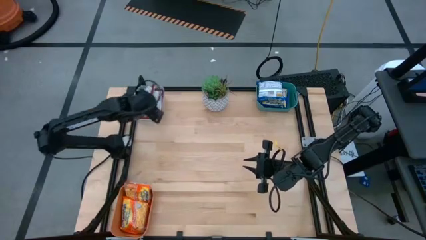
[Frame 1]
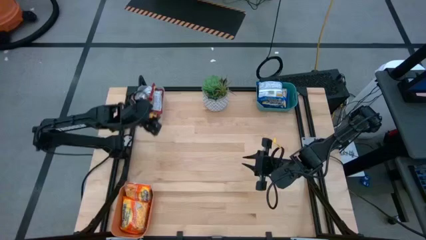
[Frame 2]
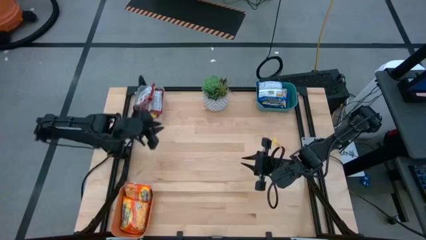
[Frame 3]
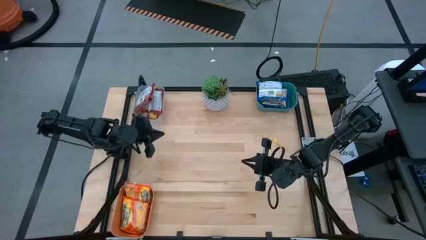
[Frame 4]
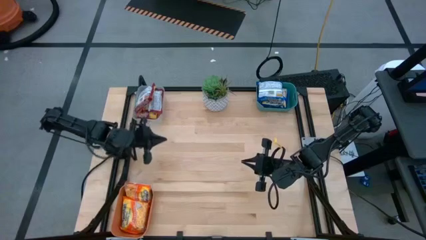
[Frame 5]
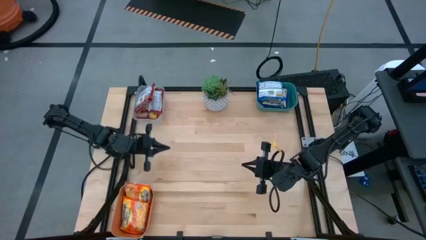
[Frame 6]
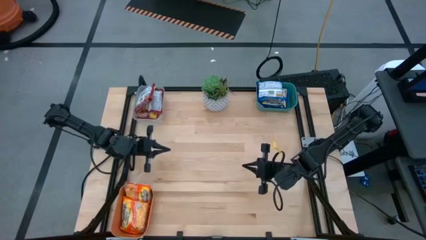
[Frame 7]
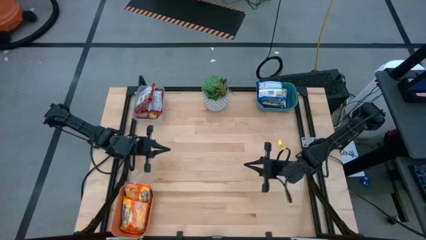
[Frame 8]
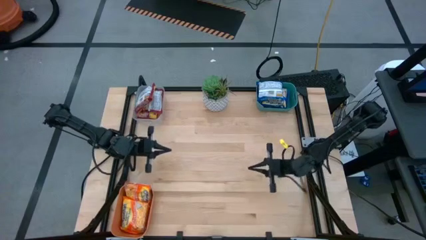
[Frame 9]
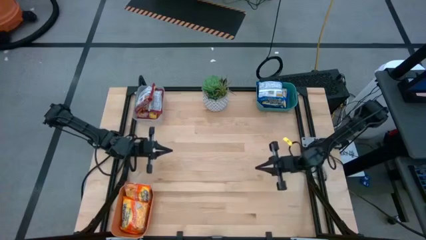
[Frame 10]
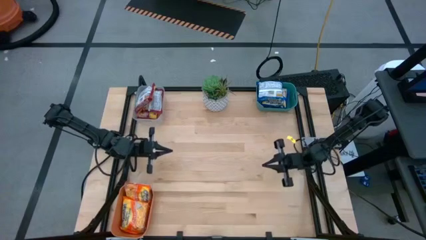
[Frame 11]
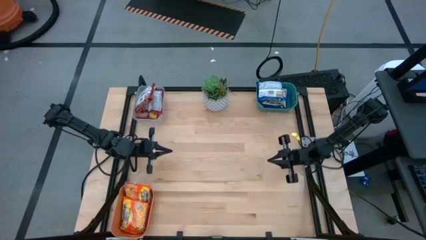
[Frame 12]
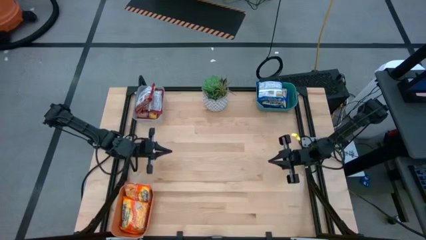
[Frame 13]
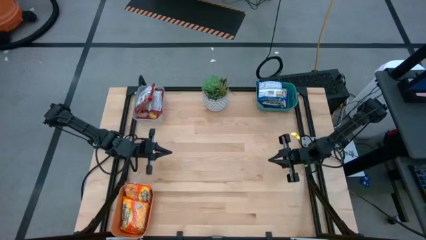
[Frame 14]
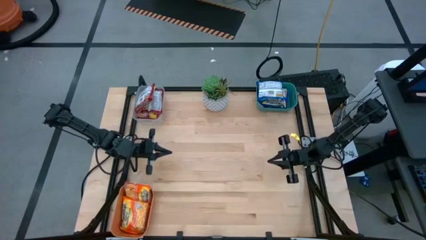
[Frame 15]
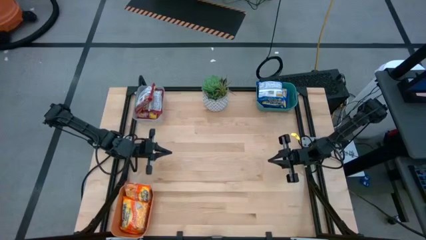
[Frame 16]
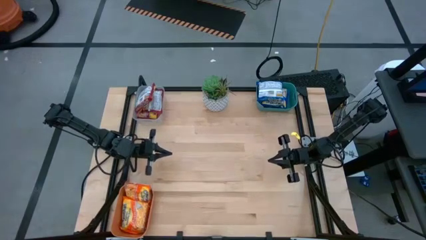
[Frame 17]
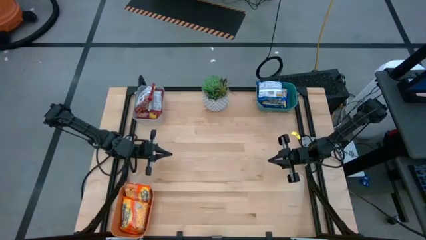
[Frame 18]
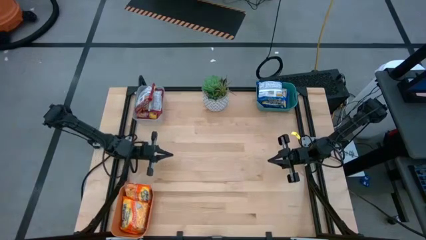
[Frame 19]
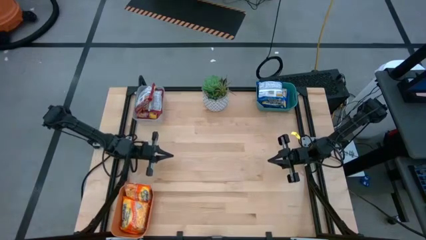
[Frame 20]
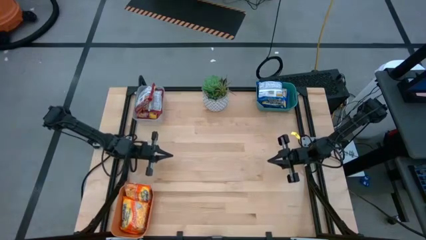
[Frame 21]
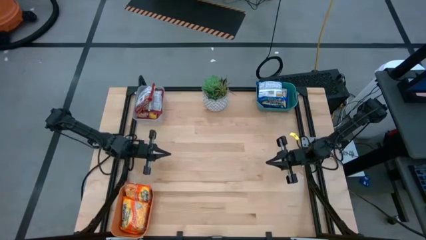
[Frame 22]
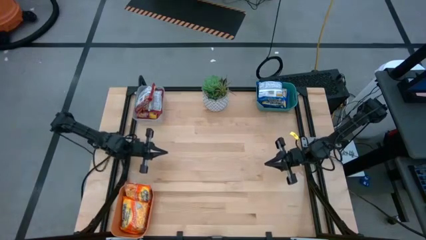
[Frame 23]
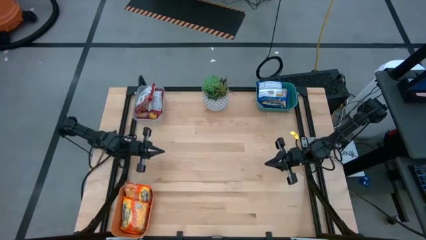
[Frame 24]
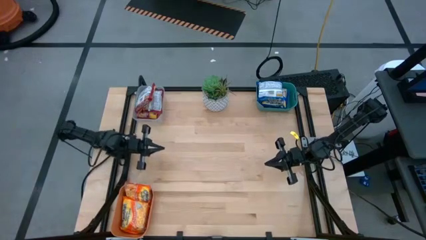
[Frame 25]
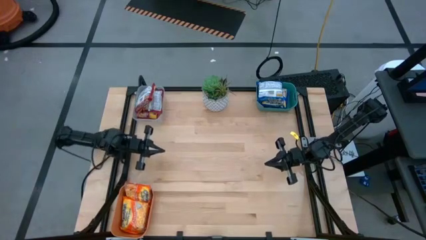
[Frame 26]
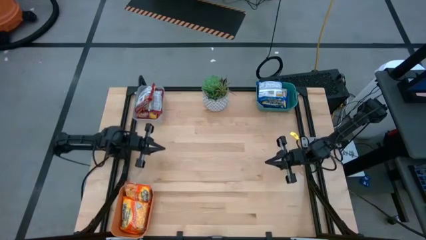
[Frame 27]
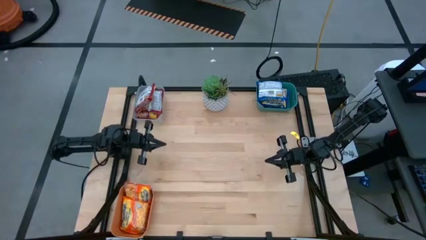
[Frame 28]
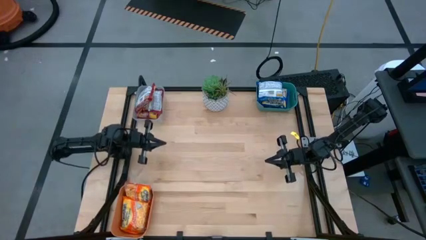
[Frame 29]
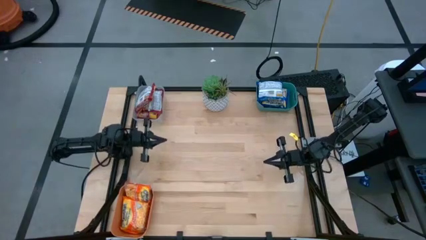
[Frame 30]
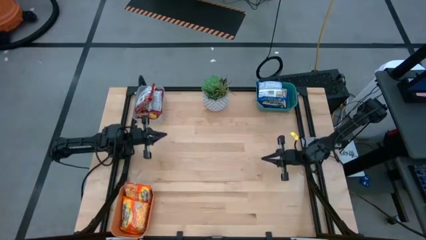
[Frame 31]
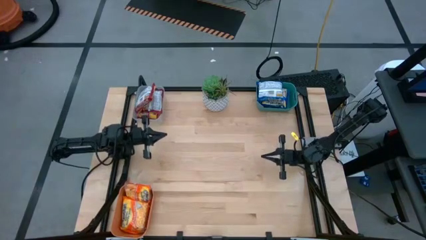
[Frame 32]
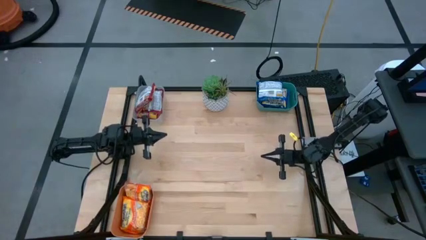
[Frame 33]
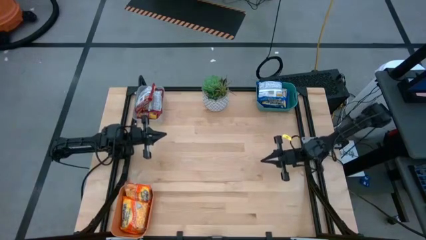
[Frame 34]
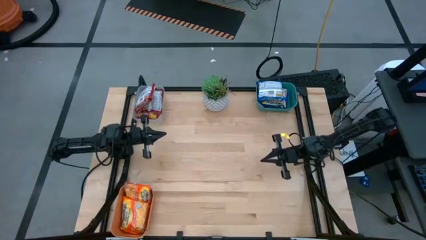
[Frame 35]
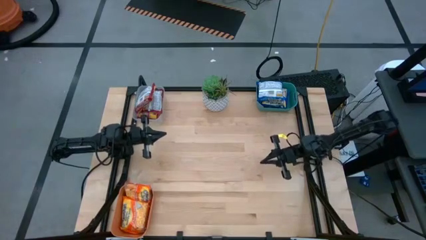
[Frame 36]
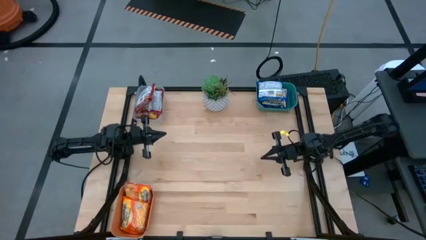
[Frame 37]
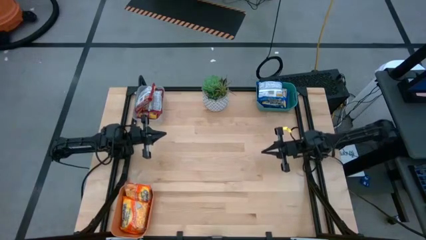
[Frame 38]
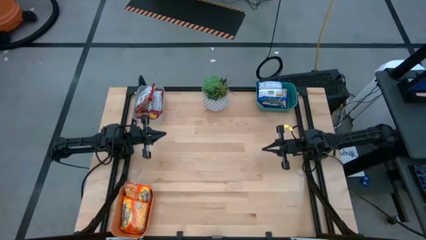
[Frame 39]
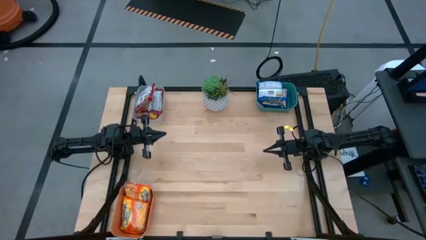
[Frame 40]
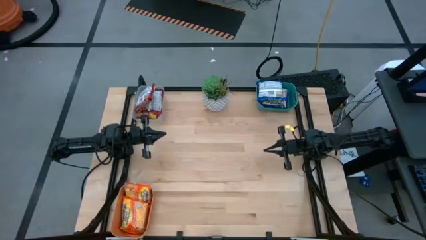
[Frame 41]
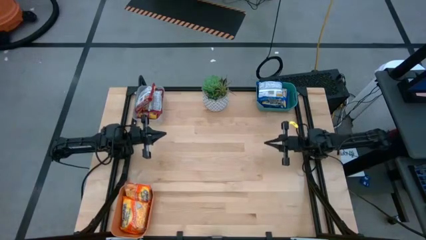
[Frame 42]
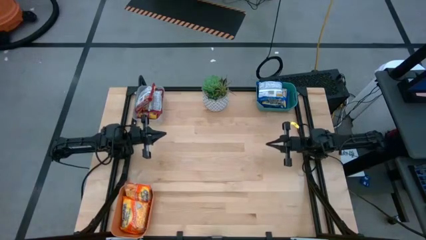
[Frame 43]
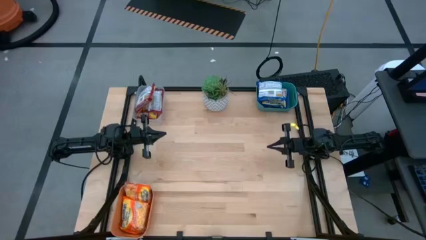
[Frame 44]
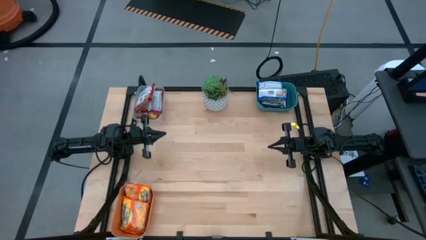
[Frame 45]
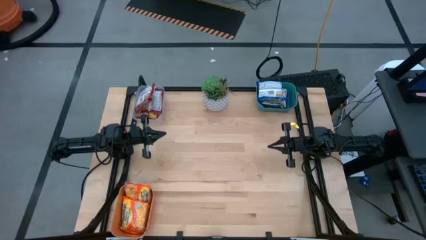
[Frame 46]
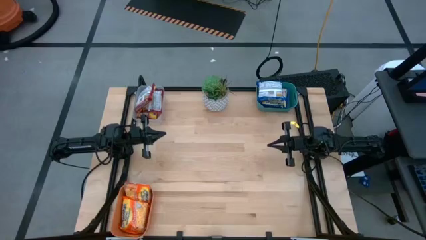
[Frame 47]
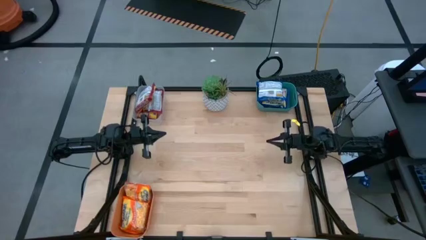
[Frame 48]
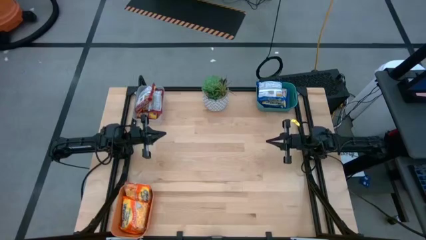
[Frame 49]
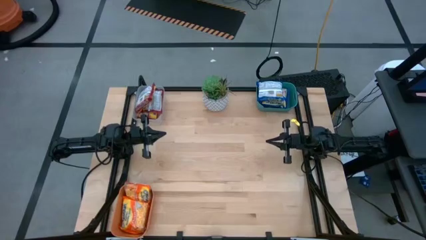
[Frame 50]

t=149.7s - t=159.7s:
Task: Sort Maruchan noodles
Return to Home Position

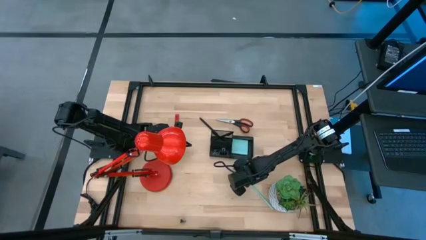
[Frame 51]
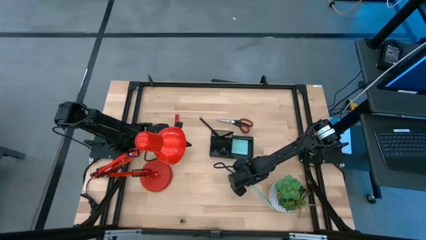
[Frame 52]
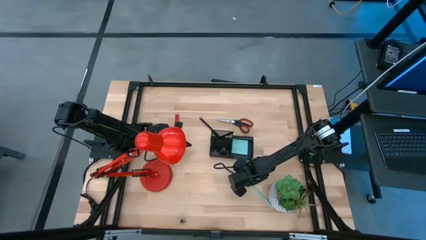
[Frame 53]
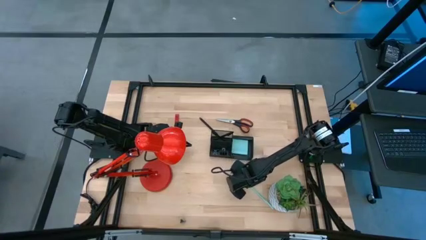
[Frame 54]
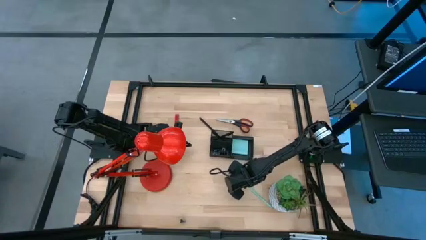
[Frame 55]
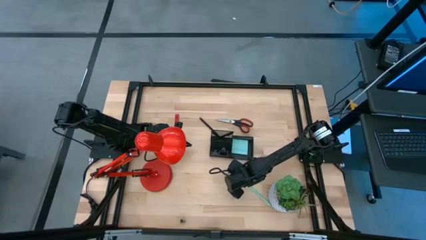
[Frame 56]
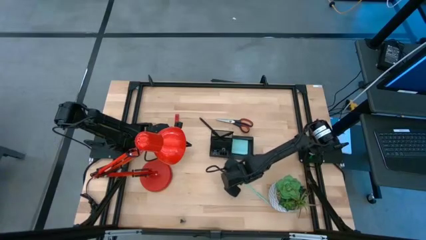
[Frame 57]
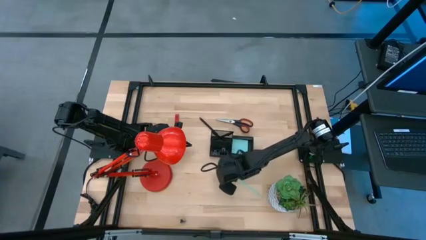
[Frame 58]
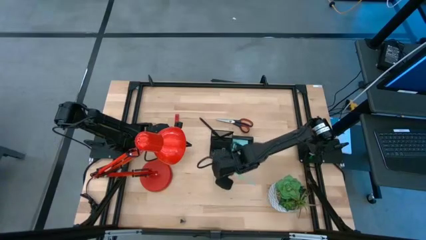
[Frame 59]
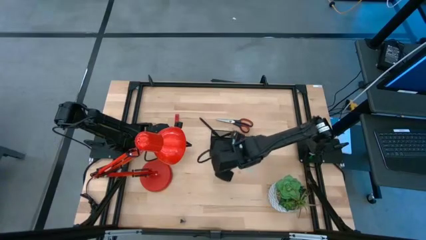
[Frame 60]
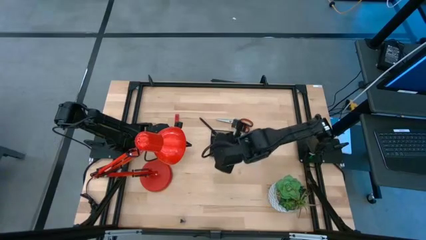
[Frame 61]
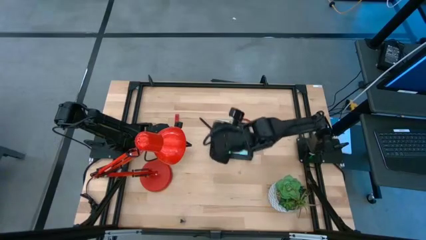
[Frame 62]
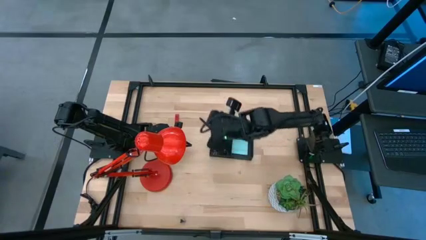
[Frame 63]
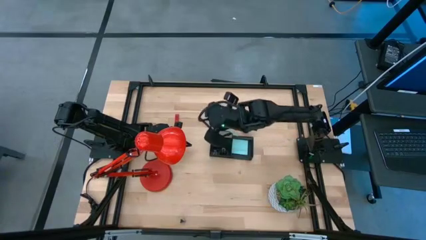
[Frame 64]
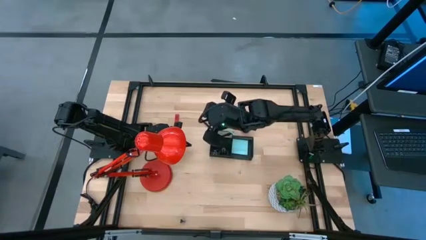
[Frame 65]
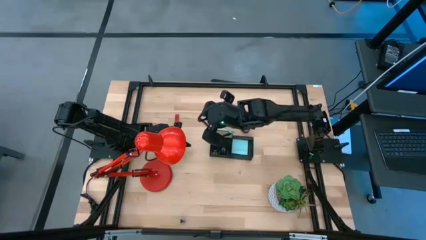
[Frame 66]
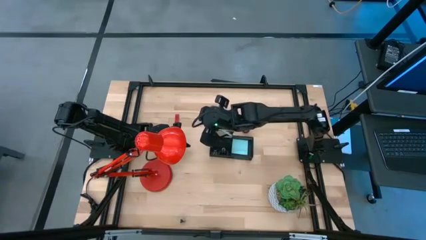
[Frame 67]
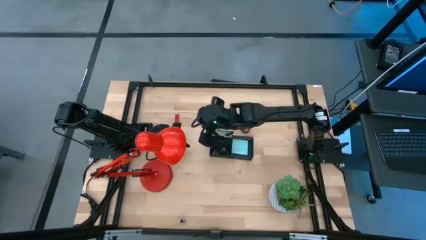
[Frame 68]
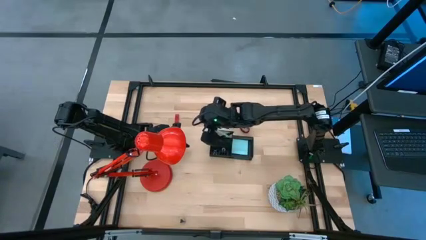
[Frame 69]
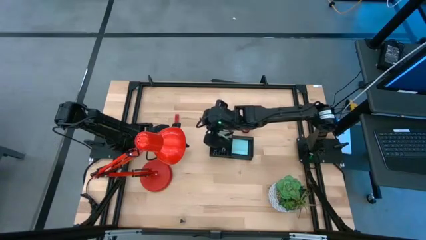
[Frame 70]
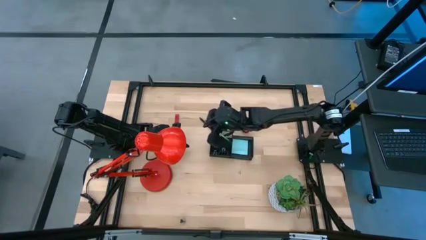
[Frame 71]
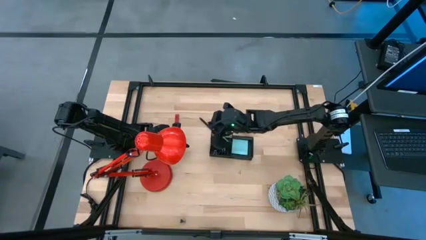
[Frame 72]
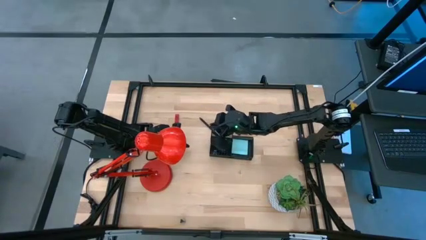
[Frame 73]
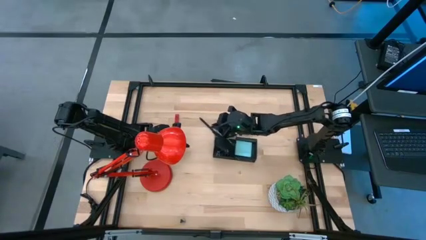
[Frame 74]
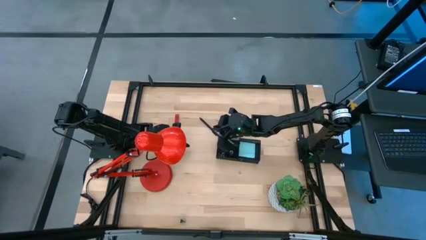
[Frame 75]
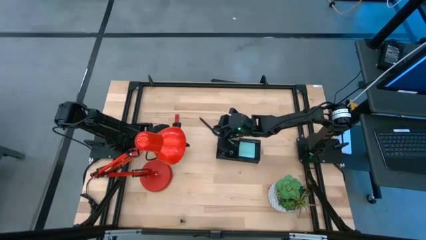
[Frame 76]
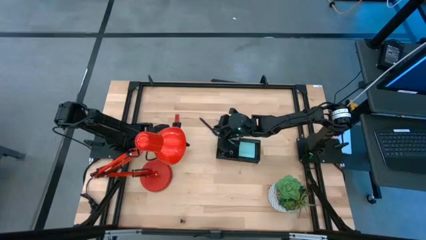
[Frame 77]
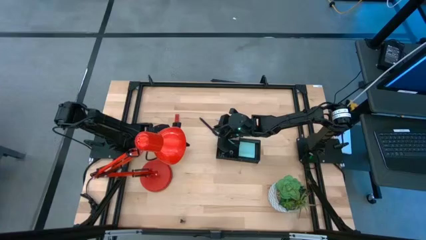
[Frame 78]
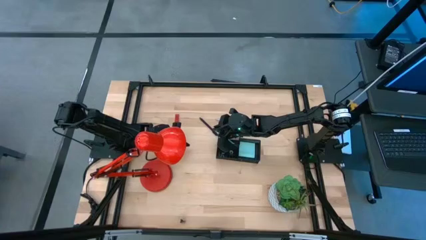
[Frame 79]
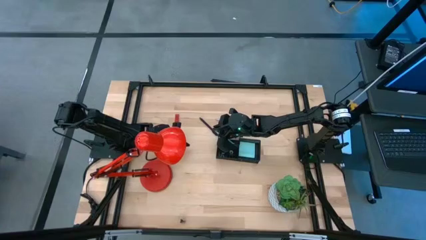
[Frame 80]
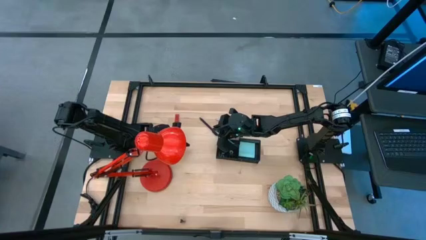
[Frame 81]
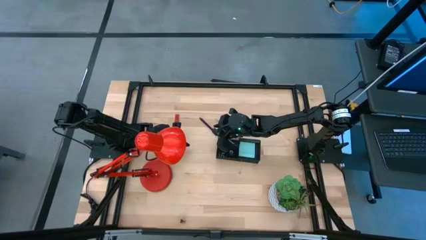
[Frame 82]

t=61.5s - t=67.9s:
Task: Pick and place office supplies into organizer
Put the light blue pencil into the black desk organizer
